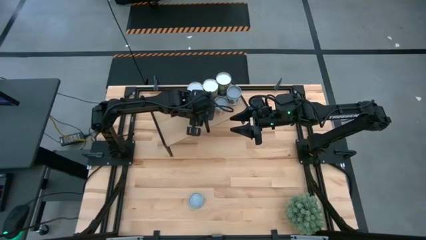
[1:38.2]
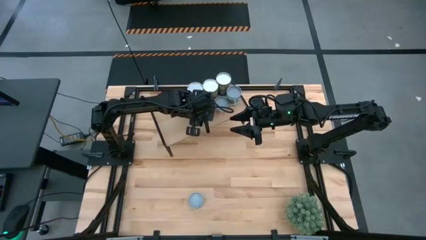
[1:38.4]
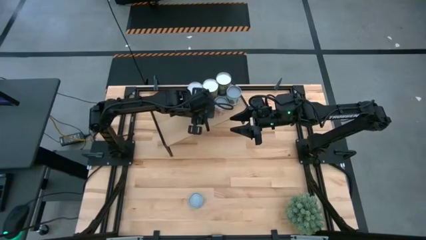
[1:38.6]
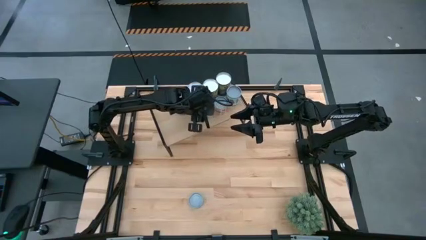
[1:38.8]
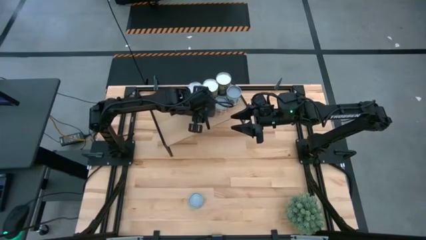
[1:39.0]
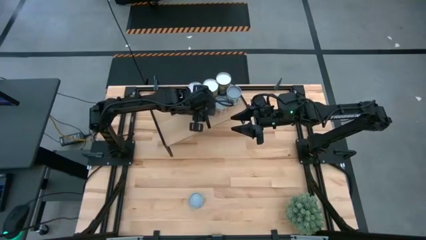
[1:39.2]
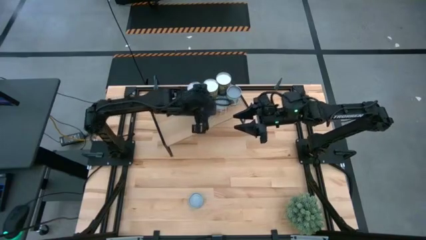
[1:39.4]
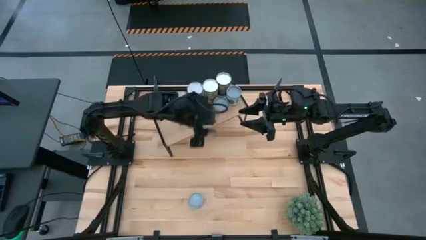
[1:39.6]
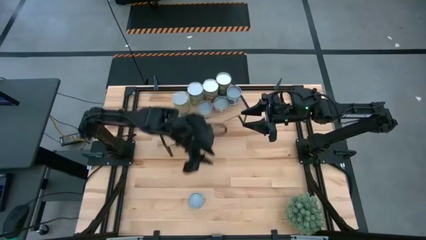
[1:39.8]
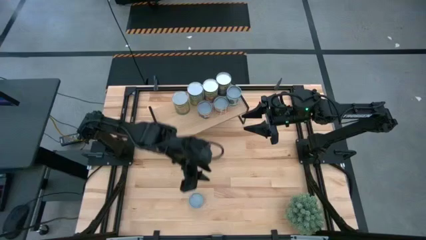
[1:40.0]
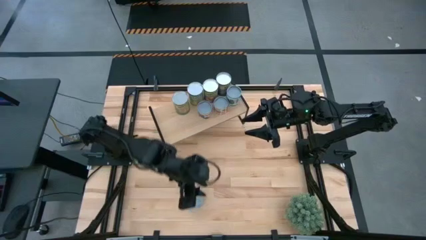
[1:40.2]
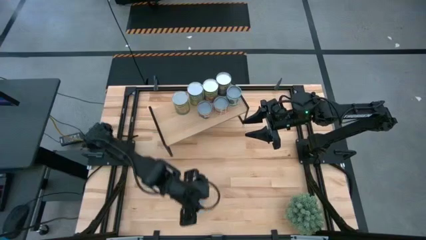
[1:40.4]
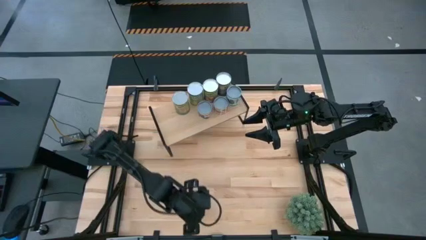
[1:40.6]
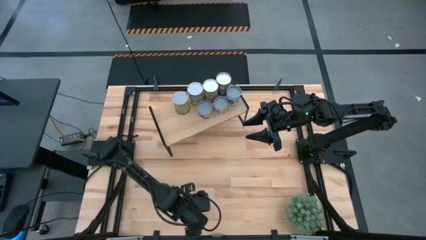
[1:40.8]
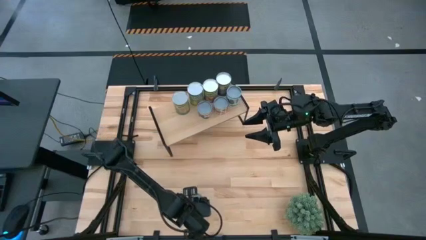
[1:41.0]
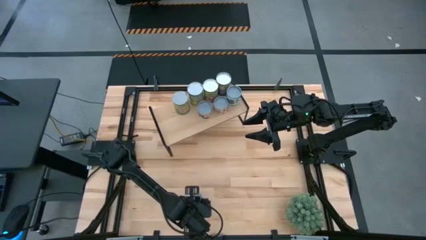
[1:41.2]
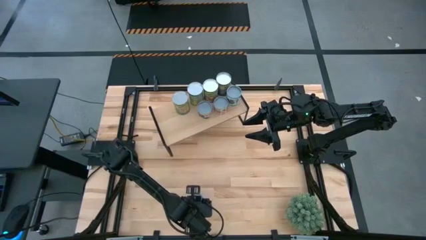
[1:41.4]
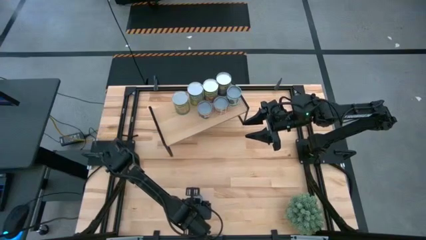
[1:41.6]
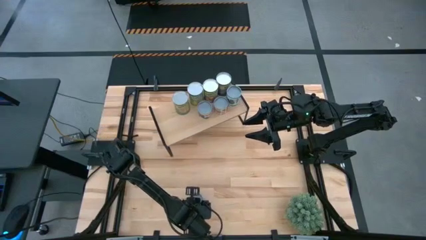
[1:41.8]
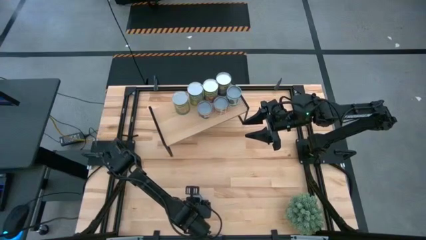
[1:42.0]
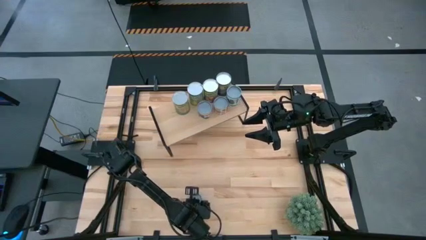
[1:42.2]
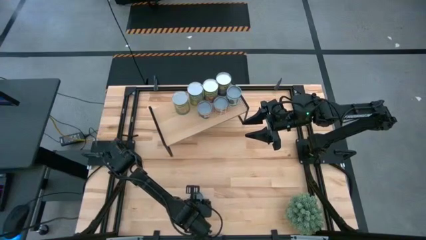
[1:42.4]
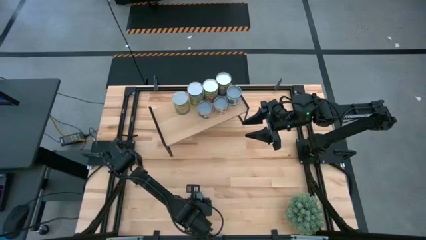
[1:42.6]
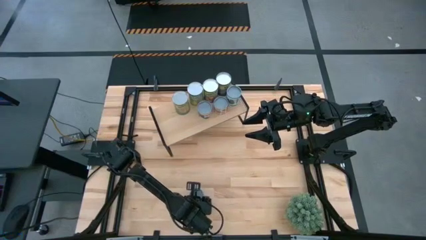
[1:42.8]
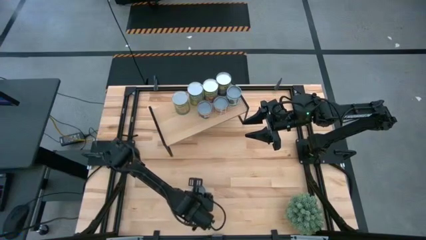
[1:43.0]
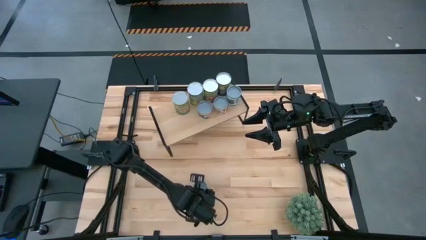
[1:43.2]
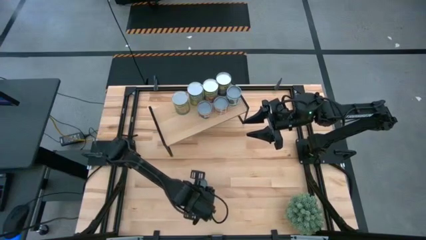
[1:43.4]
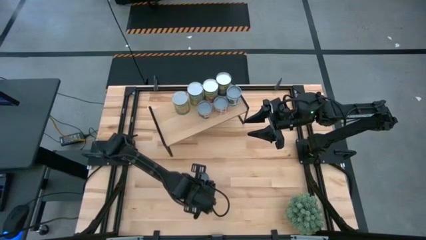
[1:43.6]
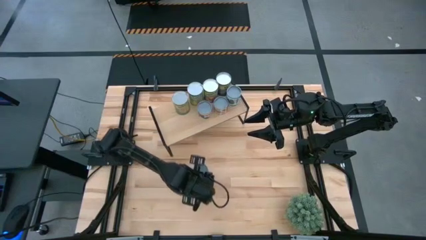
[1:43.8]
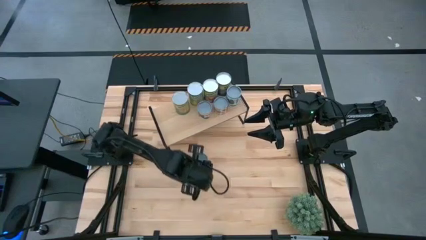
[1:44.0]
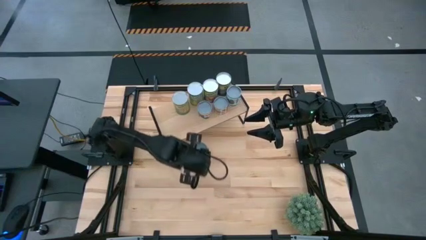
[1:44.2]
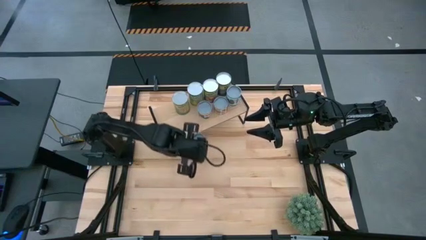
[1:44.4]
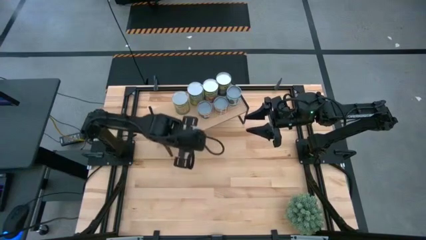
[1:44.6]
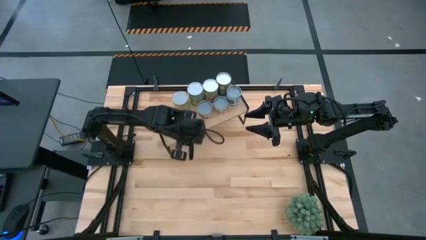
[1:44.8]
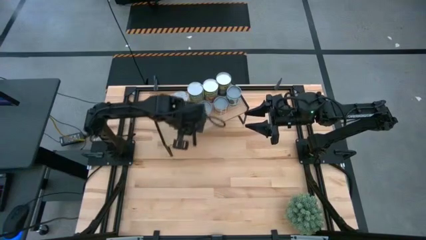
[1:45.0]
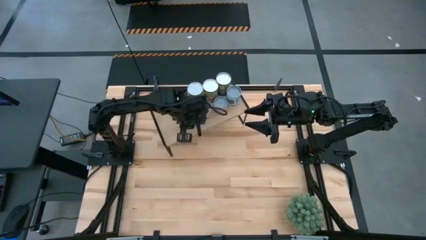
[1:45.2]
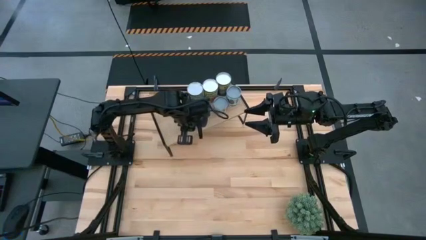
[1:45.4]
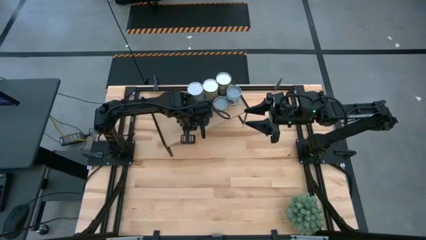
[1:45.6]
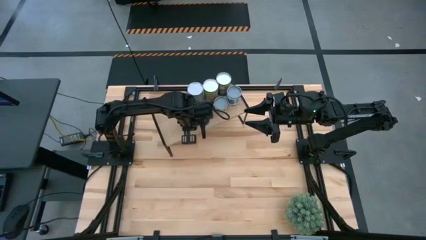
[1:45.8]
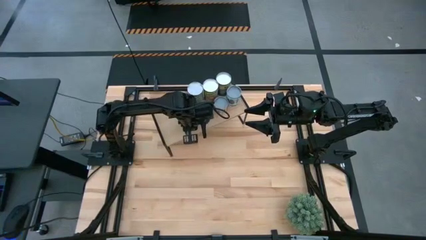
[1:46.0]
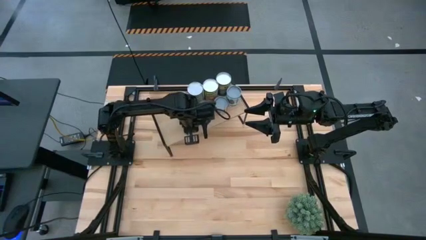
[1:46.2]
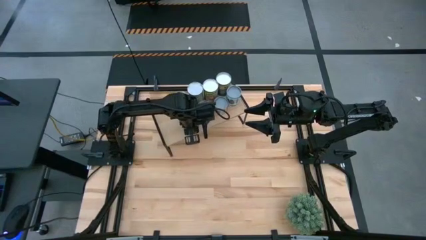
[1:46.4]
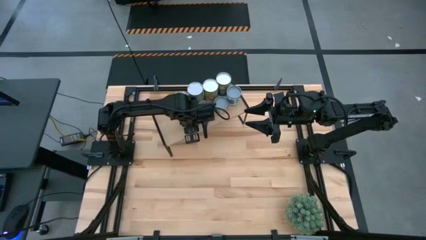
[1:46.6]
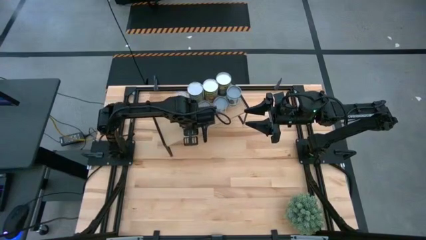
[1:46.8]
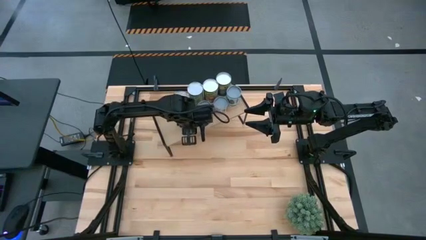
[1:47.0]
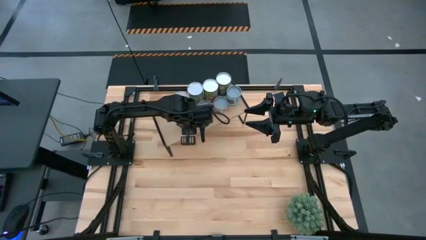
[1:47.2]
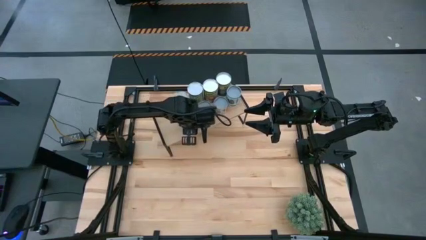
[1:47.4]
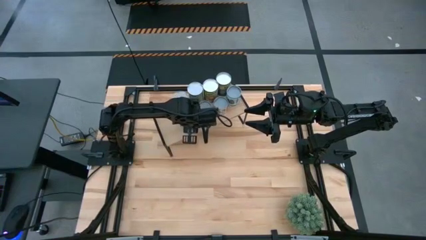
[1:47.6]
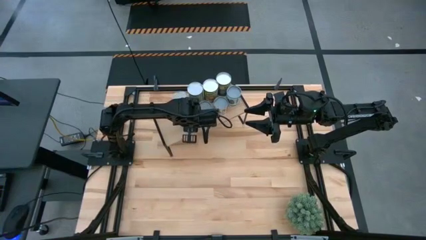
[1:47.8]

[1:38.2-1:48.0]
Task: Pick and place cans onto a shelf
Put the canned tuna on the shelf

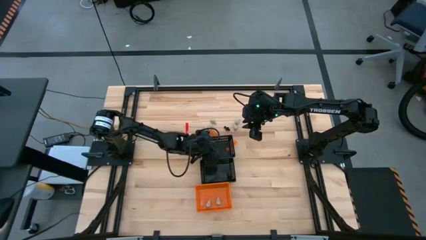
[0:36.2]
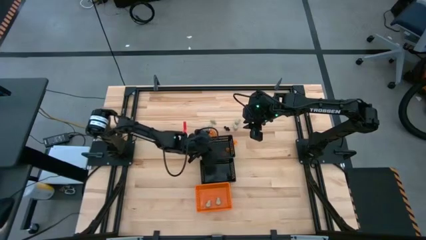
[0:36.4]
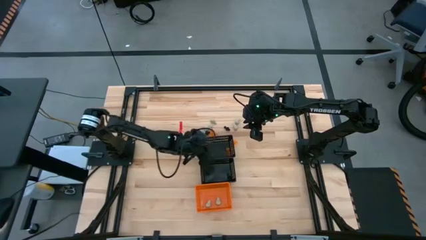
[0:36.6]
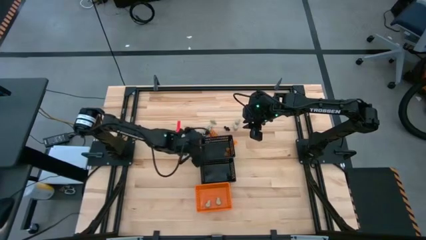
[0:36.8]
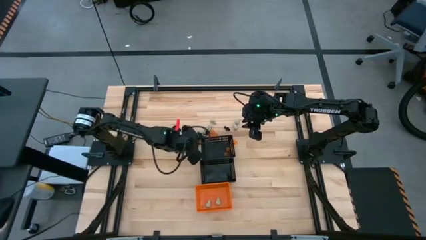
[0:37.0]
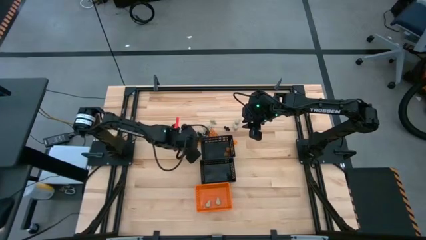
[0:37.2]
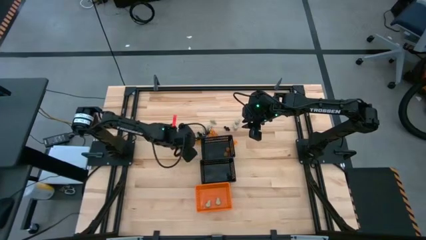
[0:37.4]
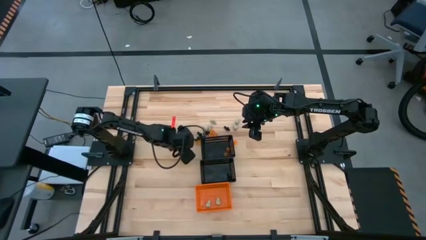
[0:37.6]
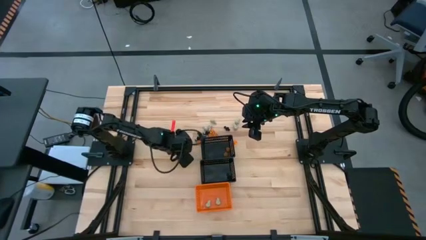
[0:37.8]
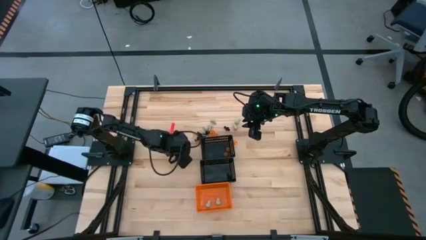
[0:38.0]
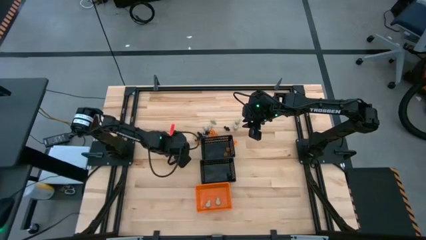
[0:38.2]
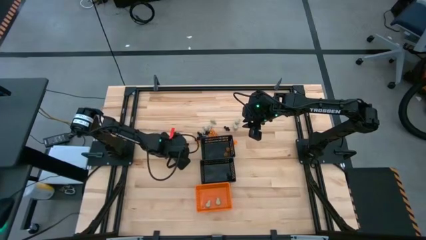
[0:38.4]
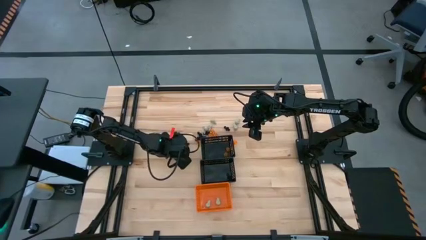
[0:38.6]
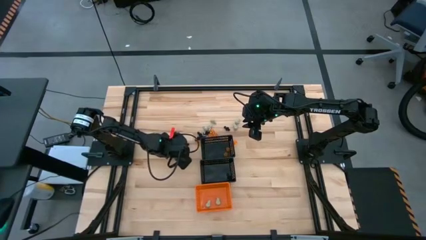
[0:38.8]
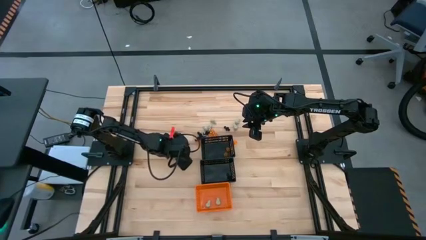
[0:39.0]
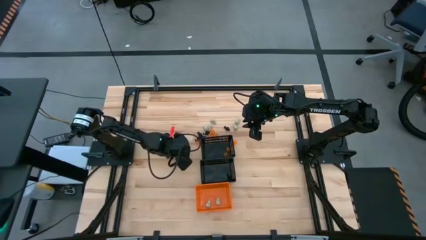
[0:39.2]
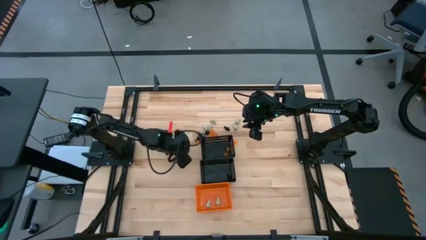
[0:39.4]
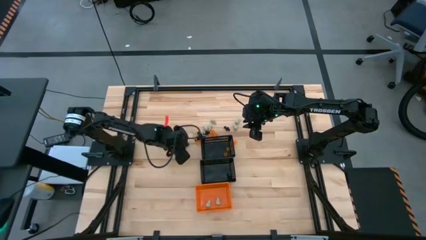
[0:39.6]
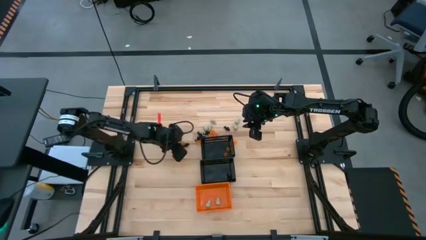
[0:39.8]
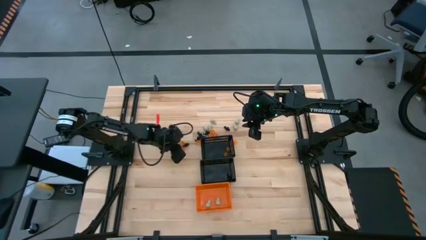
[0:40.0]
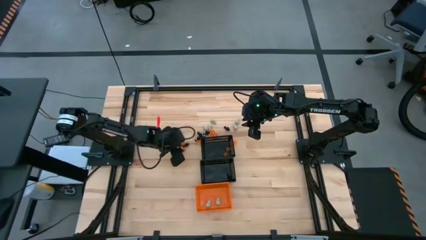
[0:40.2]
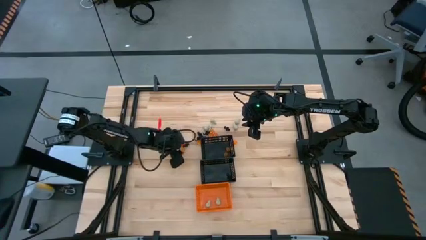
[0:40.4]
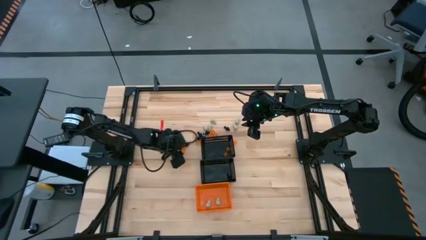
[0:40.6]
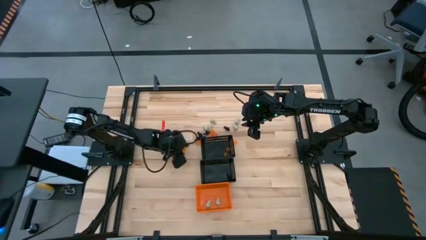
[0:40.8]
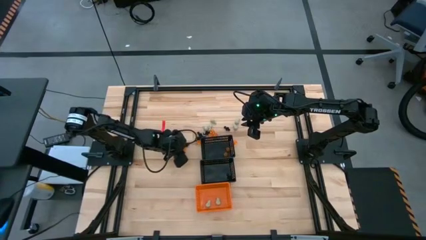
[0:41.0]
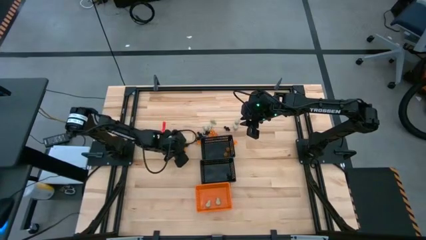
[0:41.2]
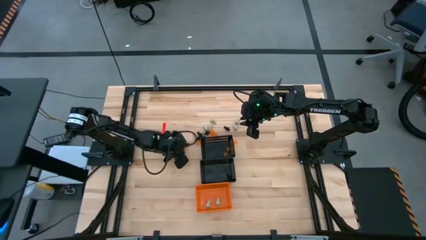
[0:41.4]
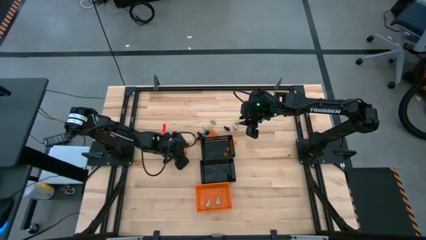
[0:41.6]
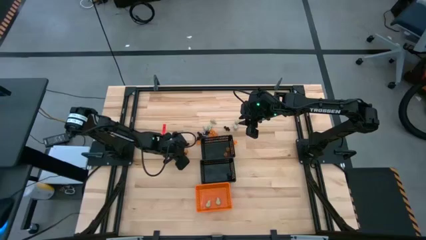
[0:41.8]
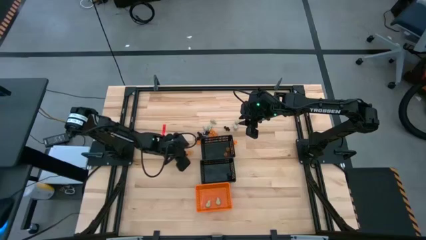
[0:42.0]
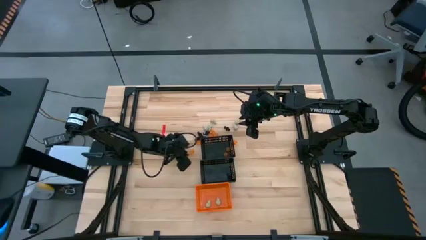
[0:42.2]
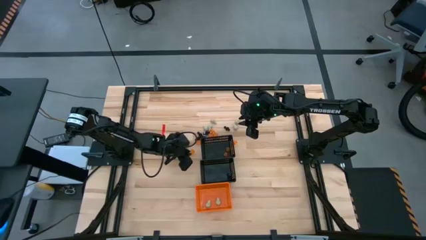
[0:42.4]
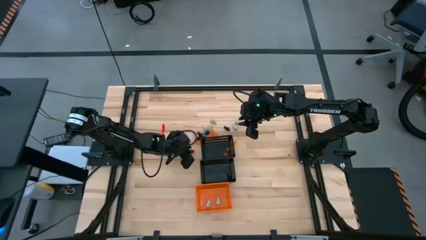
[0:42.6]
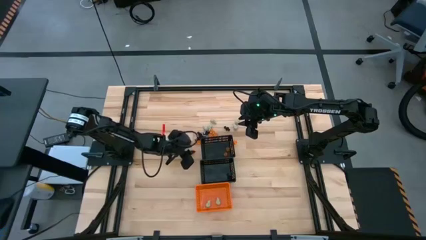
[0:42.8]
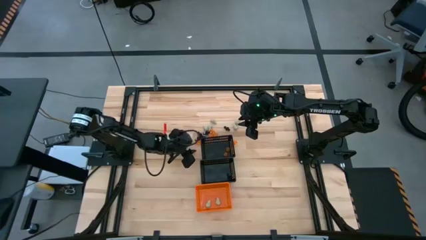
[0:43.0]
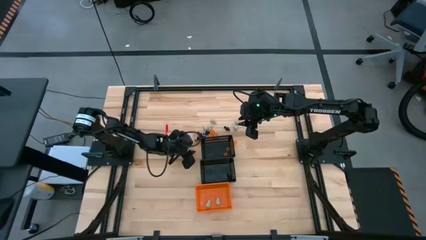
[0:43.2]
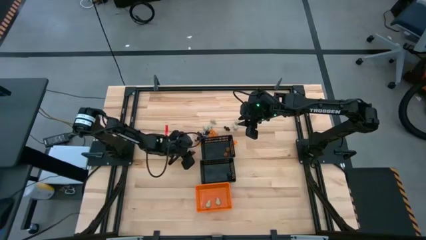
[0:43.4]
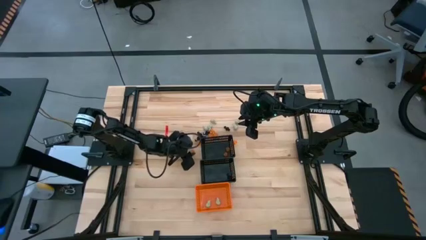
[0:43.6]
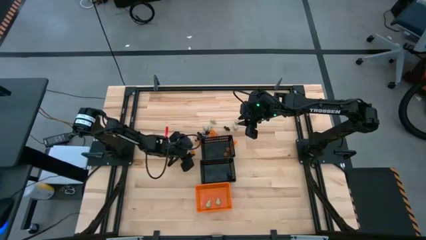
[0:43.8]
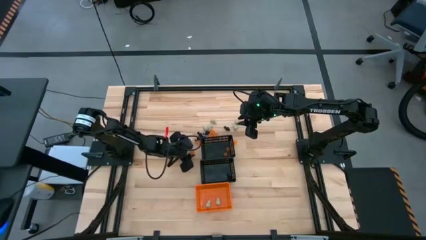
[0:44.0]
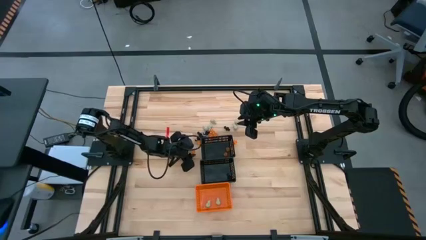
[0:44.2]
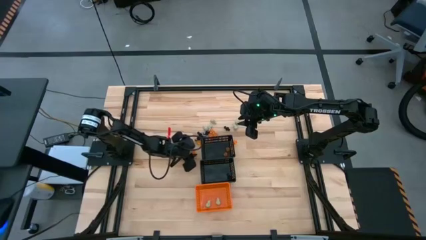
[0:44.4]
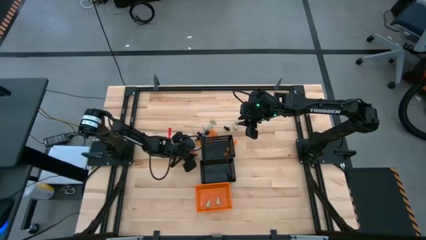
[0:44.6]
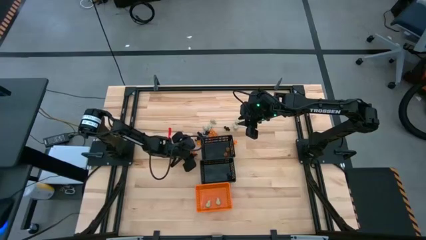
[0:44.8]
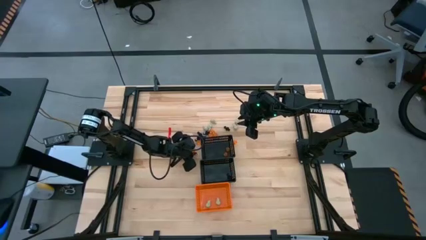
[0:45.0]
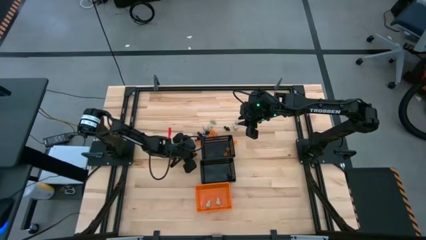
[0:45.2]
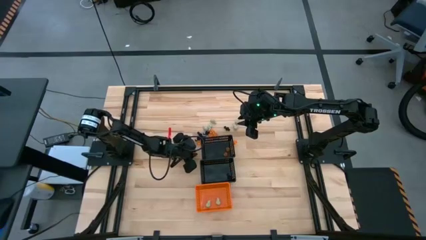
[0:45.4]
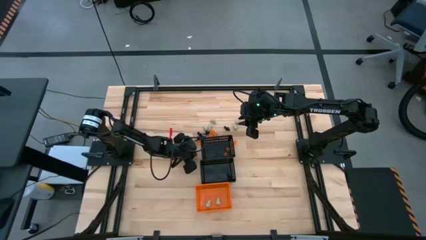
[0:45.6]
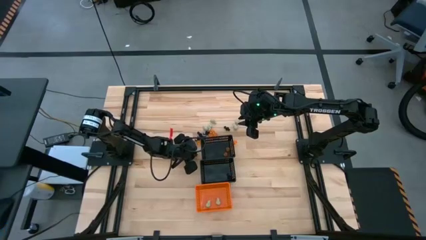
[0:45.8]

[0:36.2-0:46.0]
Task: Sort Halloween decoration
Put the orange pumpkin toy into the top black bin
